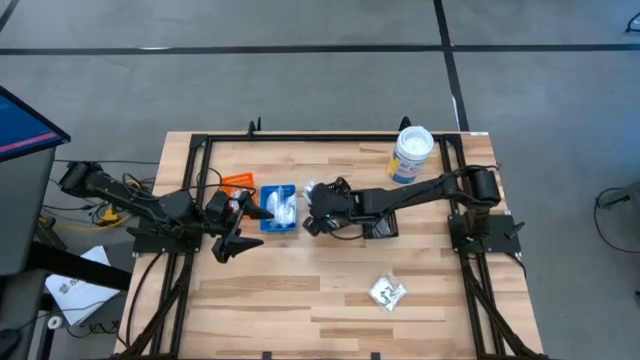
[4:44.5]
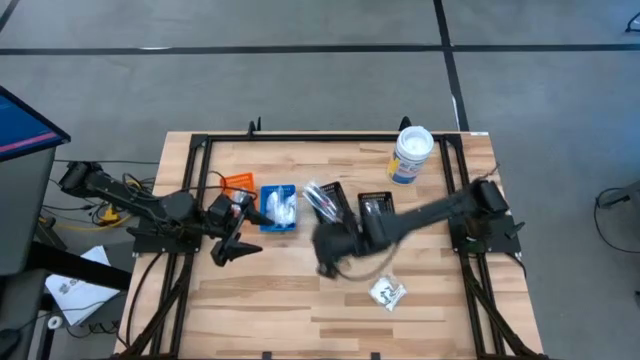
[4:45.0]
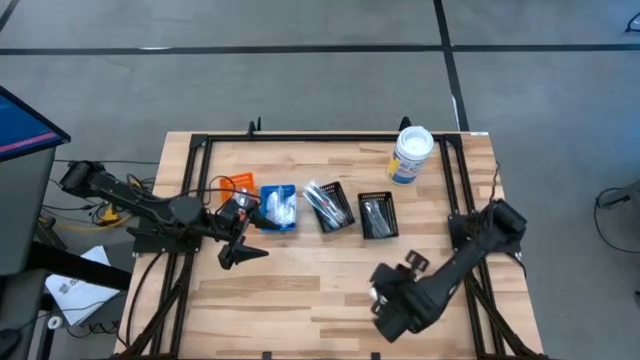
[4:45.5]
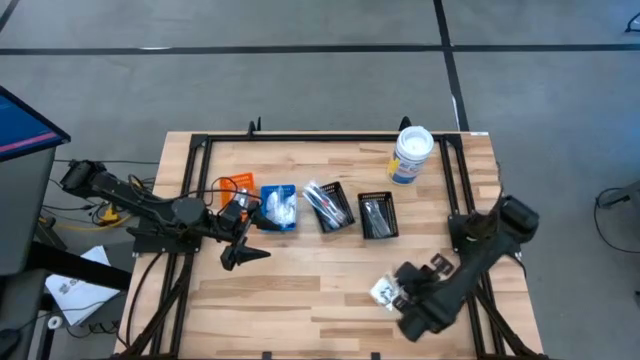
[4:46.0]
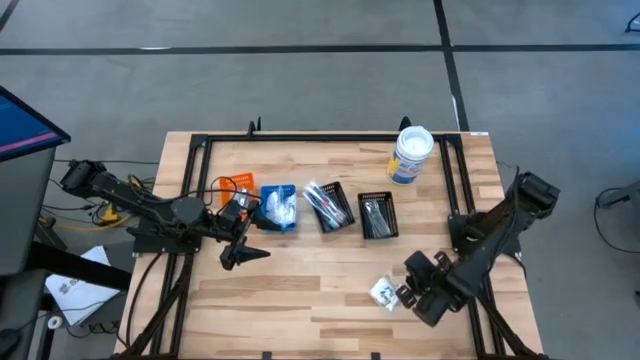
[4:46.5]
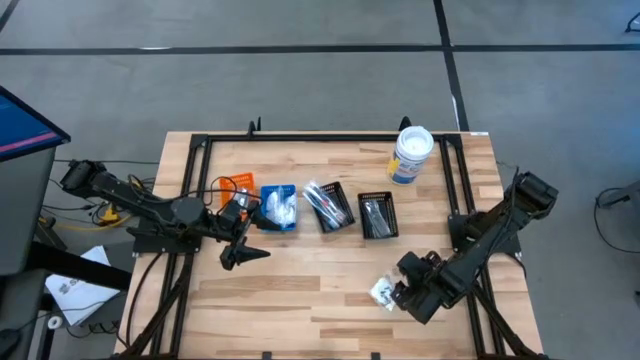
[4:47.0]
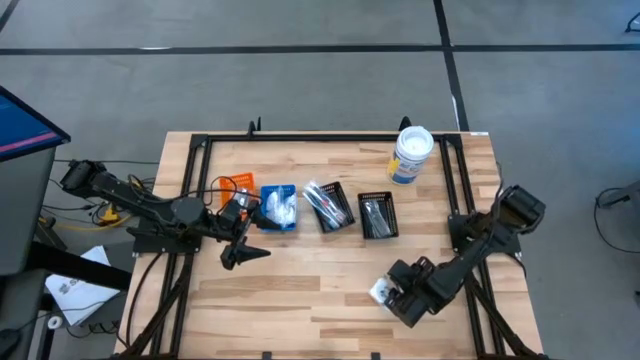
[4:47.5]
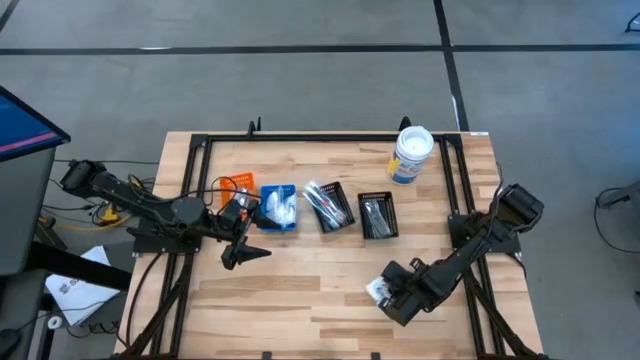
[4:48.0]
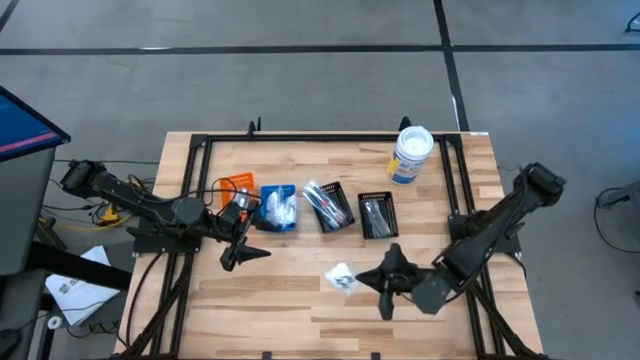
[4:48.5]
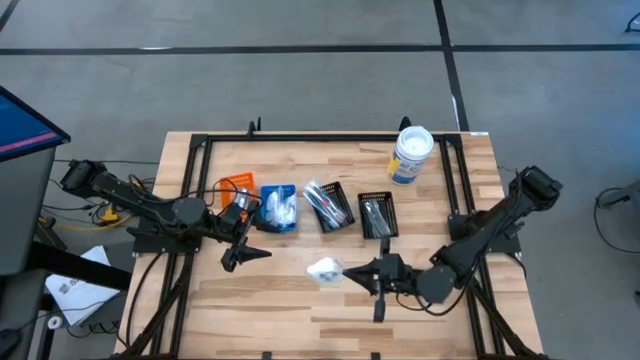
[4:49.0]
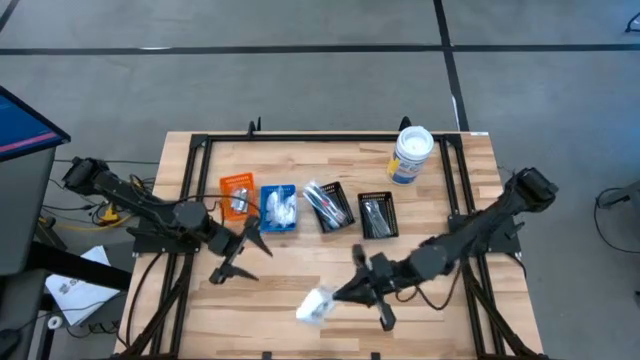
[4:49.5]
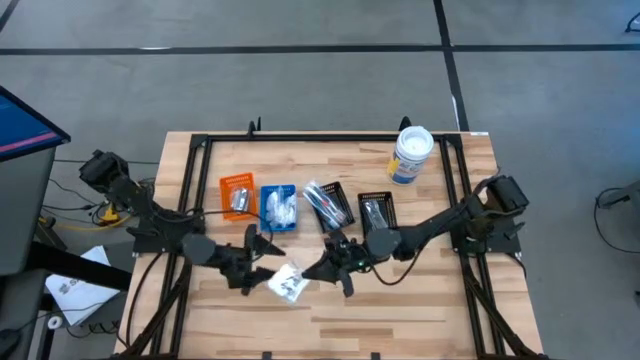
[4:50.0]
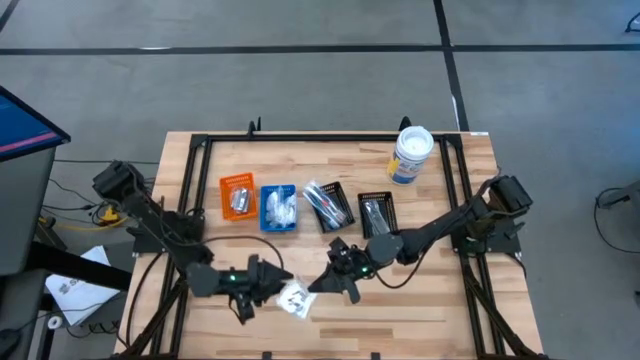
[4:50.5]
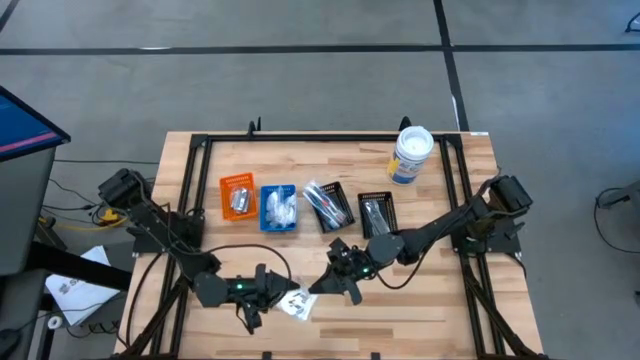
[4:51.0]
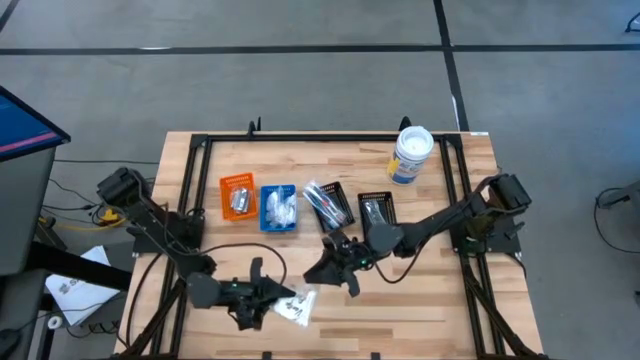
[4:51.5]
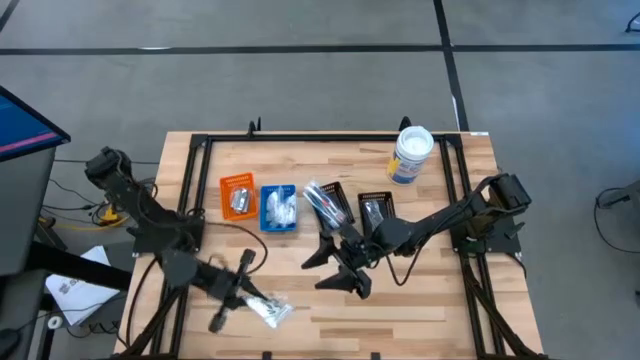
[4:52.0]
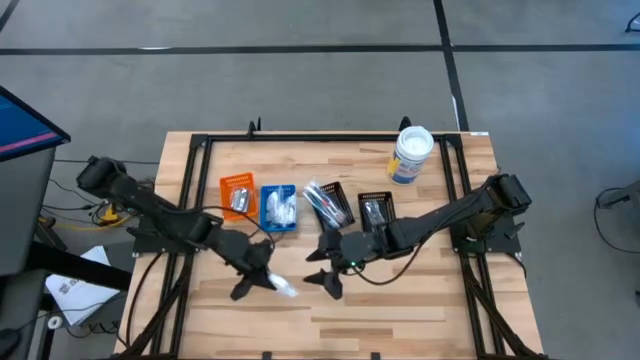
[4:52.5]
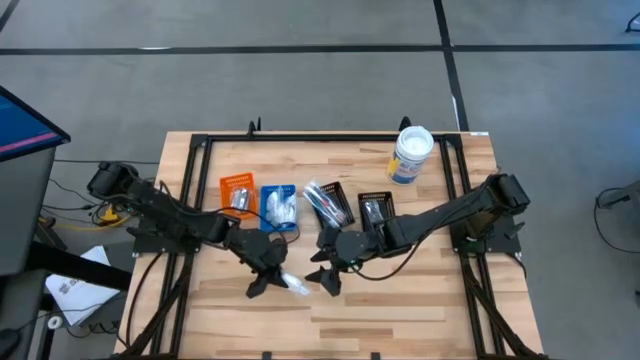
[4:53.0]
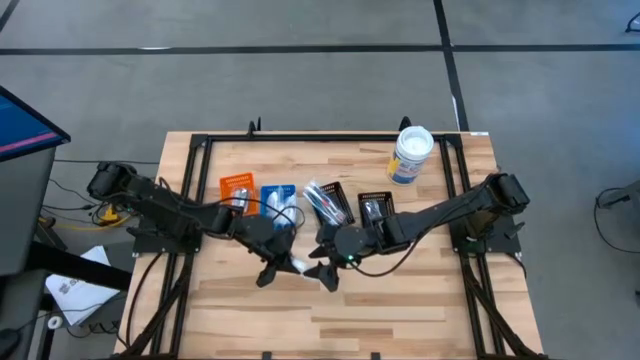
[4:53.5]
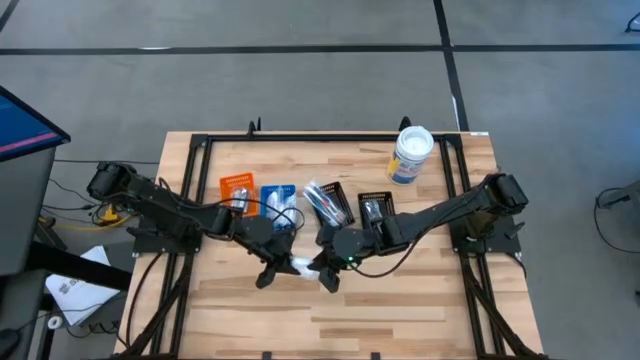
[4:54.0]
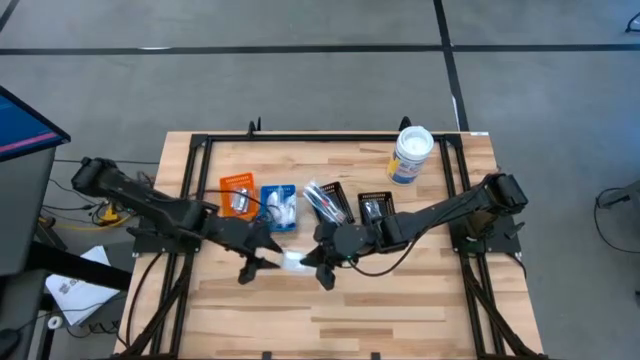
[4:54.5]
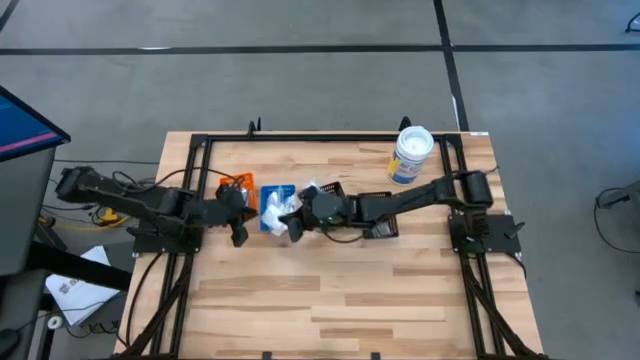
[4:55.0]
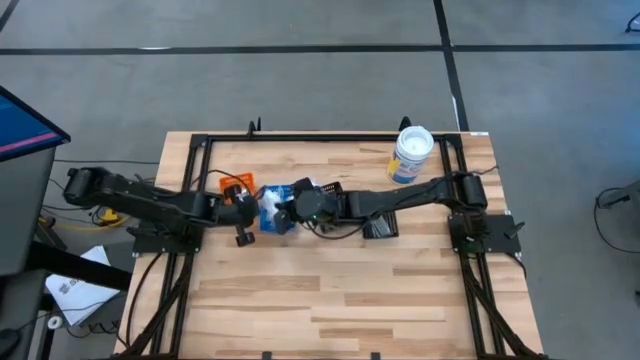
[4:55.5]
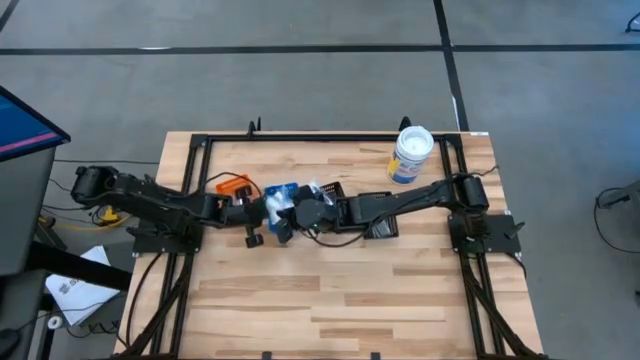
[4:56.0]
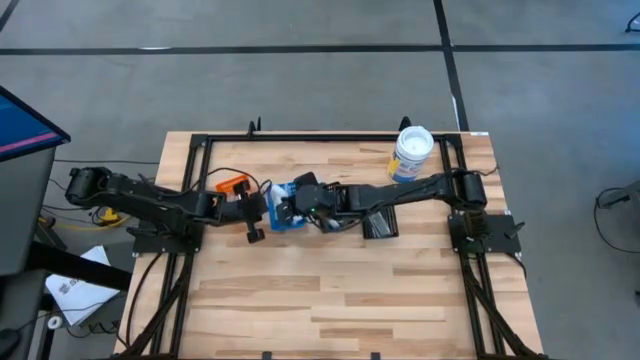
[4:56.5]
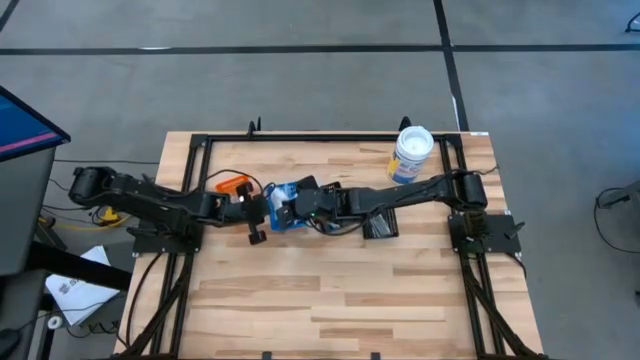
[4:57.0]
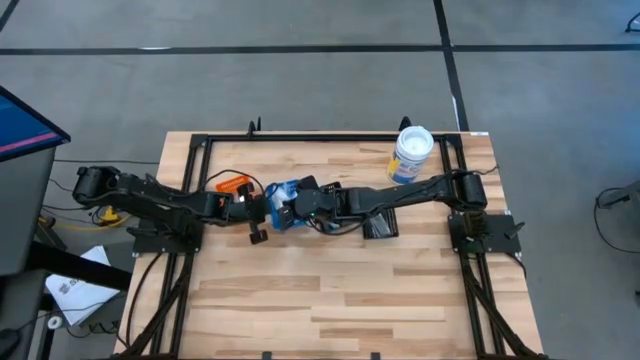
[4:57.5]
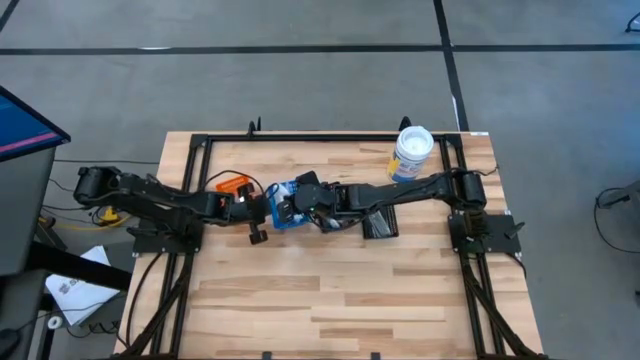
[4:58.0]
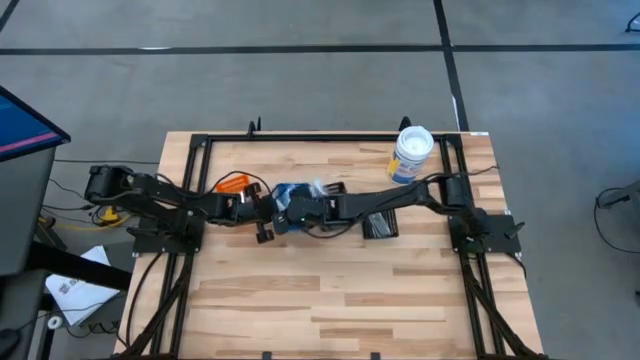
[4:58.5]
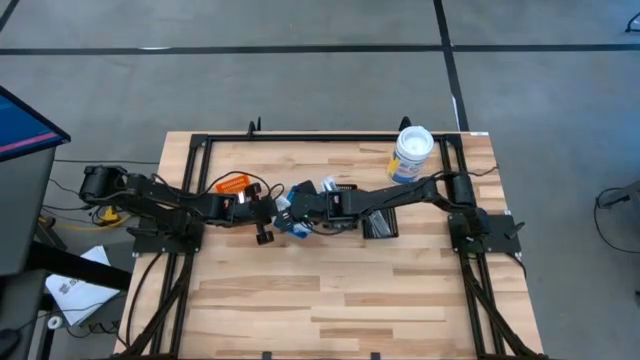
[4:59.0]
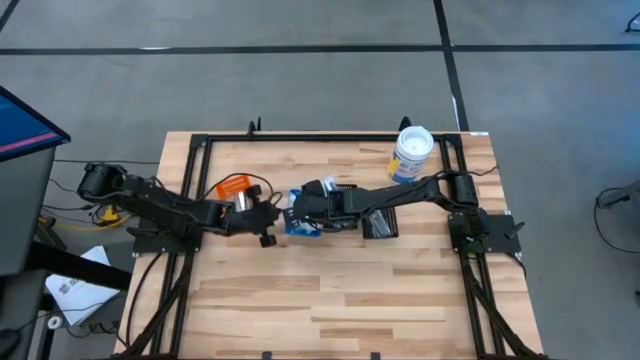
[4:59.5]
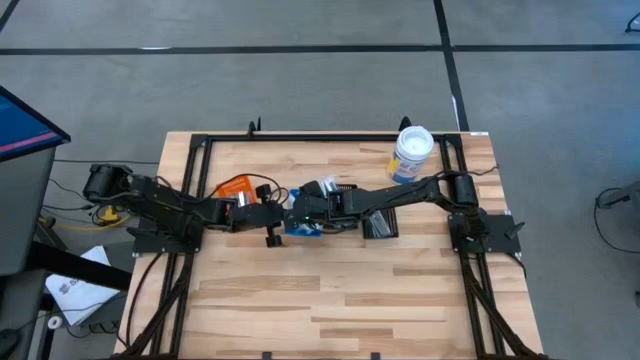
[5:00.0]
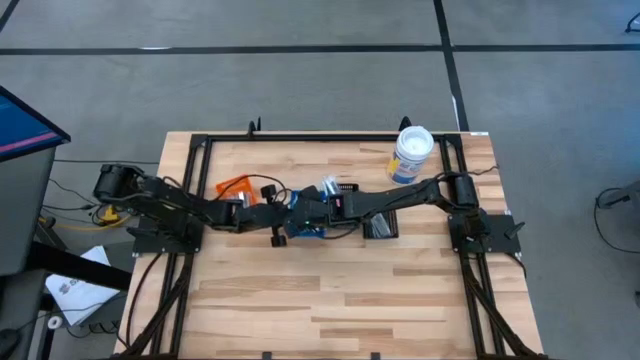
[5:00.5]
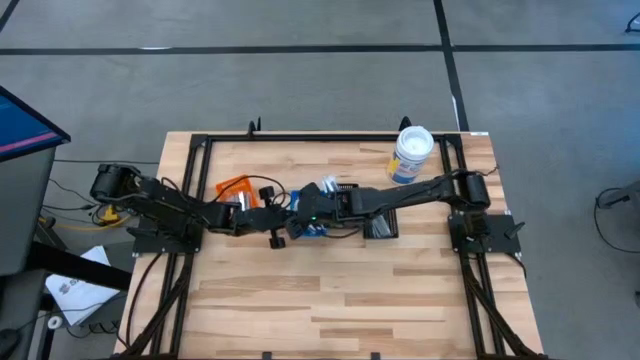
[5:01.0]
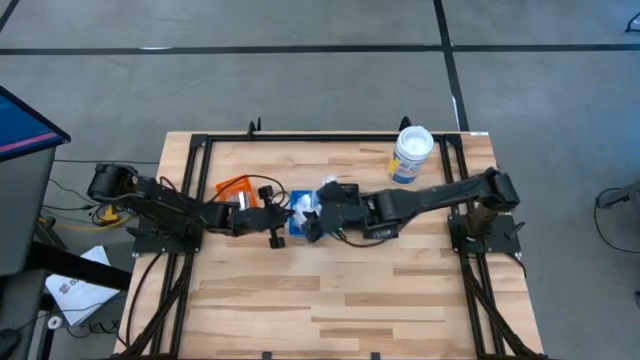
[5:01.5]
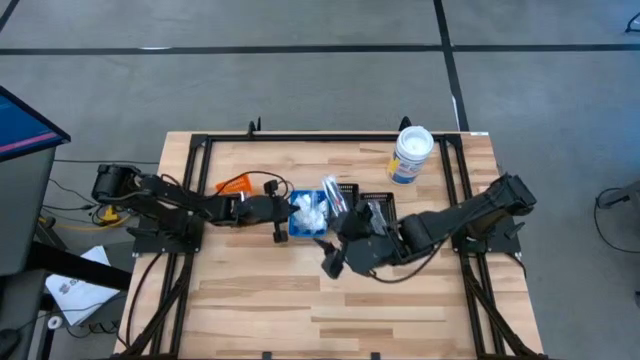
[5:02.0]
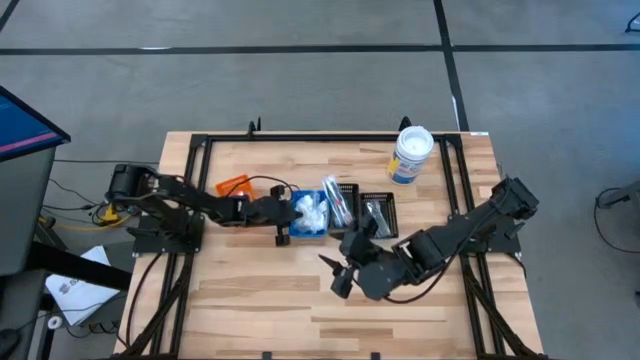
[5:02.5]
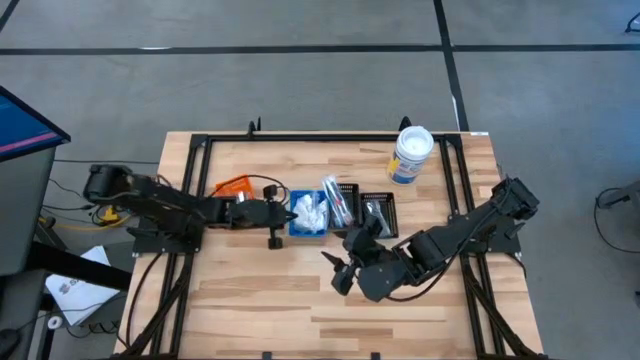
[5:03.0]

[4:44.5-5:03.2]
Task: Pick & Place Travel size toiletries
Put the pack of cotton buds into the blue bin

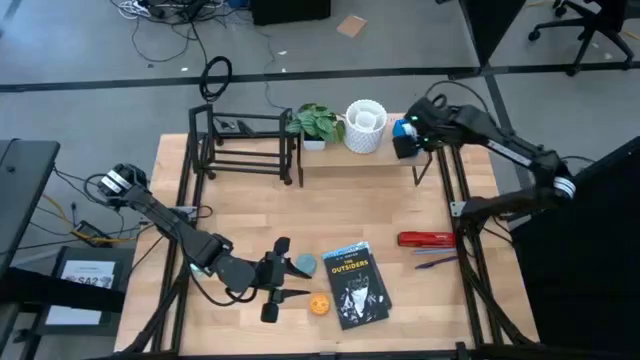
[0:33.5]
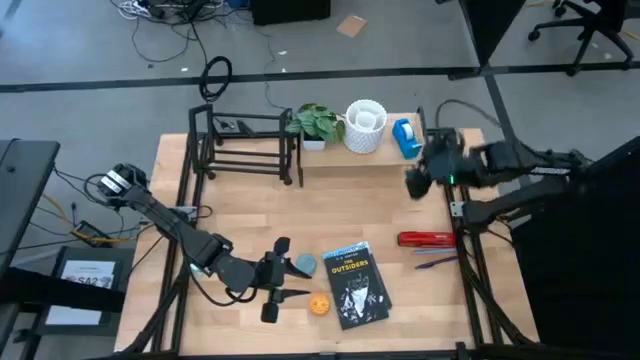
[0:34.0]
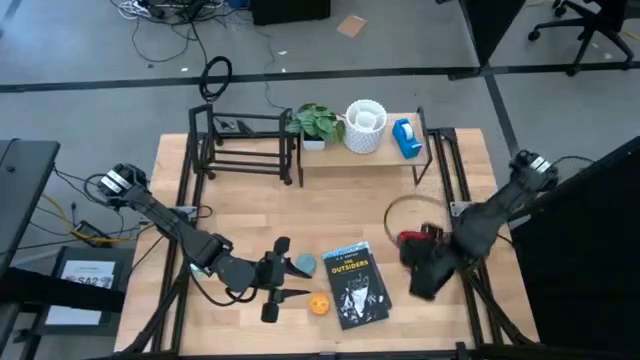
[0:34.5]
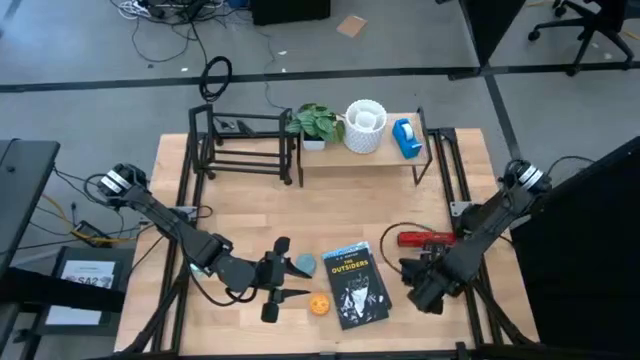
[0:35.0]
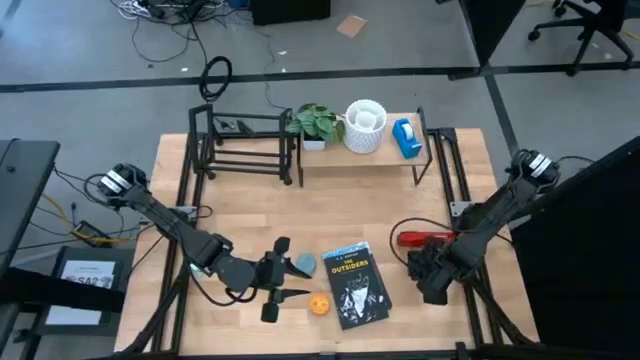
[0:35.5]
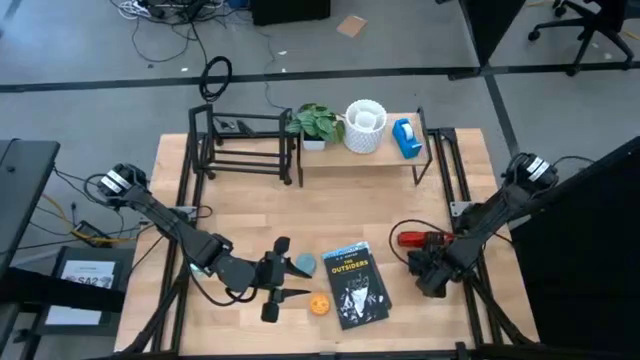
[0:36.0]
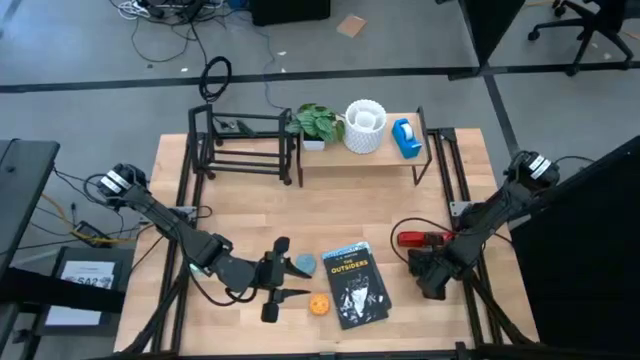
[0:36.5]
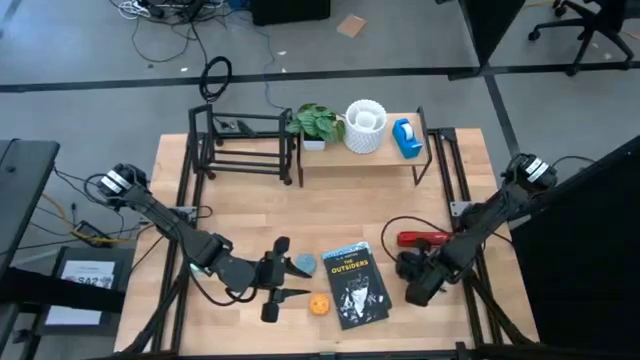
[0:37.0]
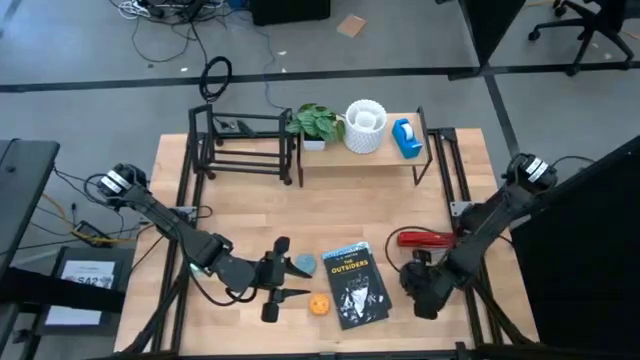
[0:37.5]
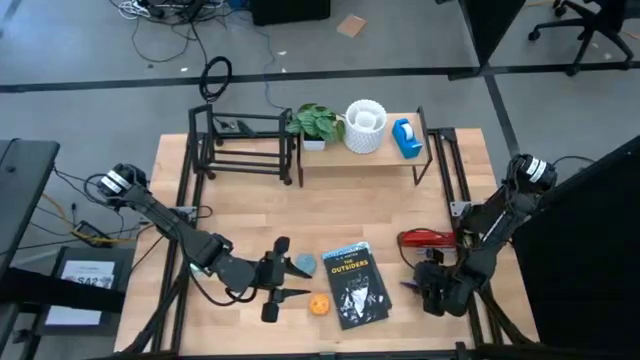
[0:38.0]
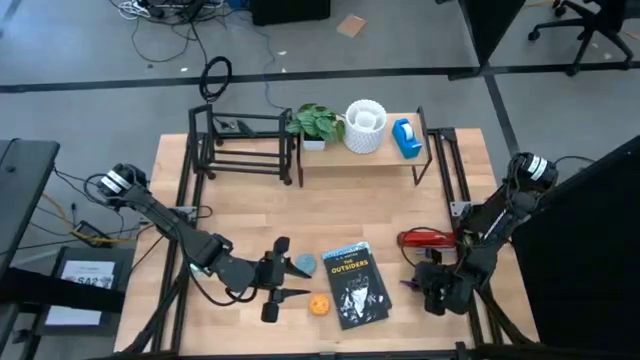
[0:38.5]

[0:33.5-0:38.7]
Task: Stock shelves
Put the blue pen into the pen organizer on the shelf
